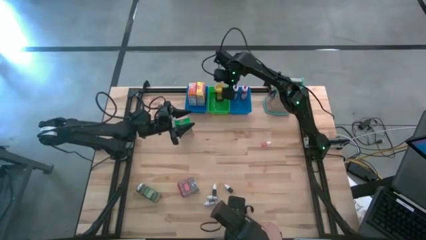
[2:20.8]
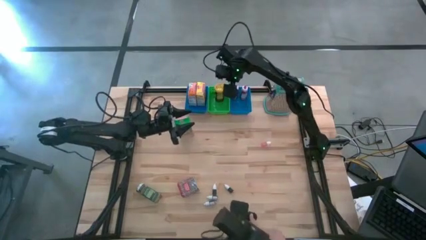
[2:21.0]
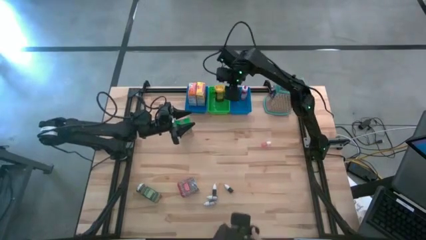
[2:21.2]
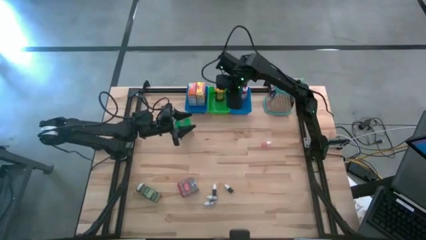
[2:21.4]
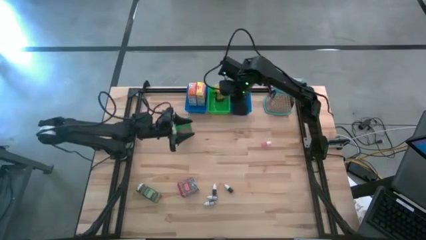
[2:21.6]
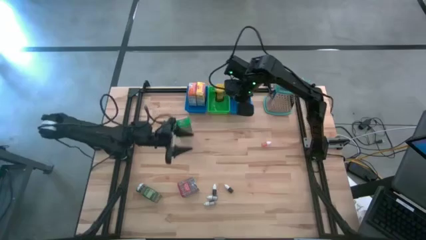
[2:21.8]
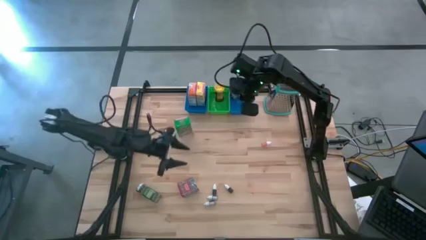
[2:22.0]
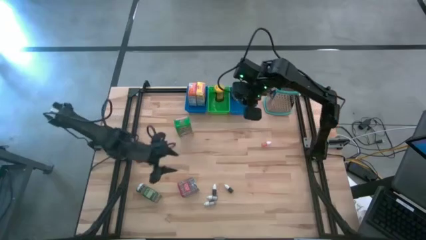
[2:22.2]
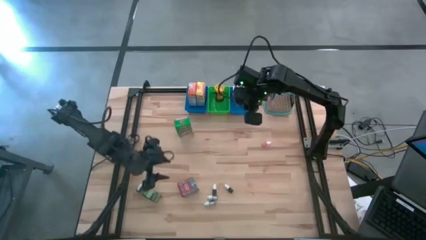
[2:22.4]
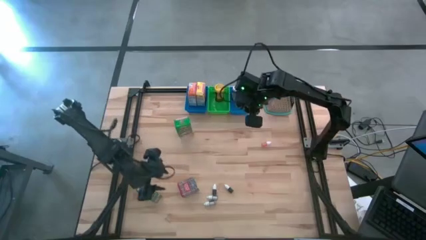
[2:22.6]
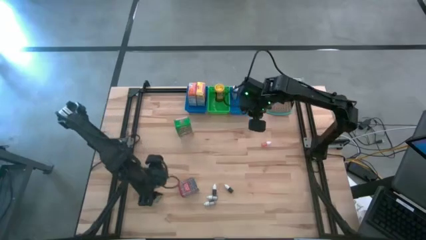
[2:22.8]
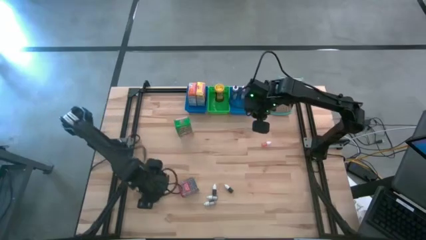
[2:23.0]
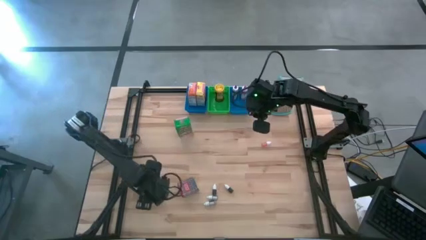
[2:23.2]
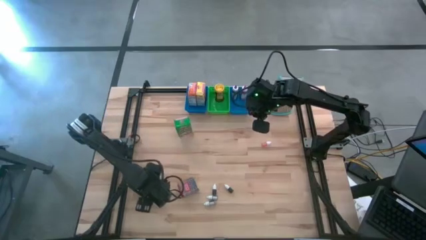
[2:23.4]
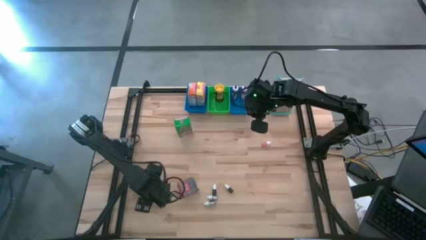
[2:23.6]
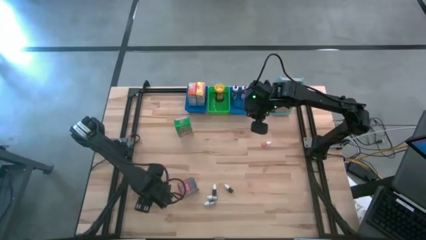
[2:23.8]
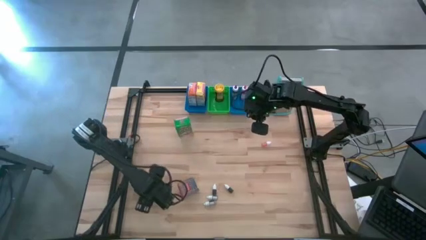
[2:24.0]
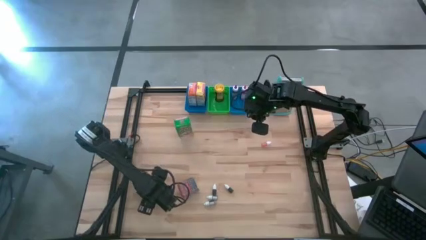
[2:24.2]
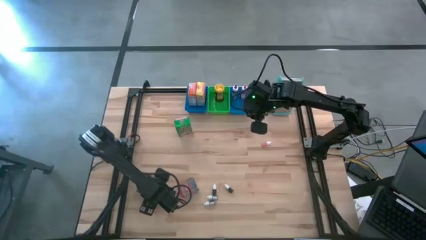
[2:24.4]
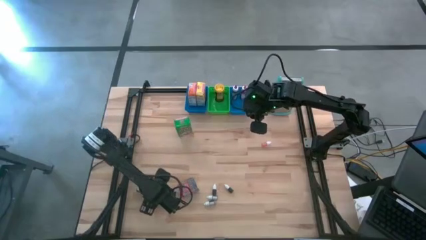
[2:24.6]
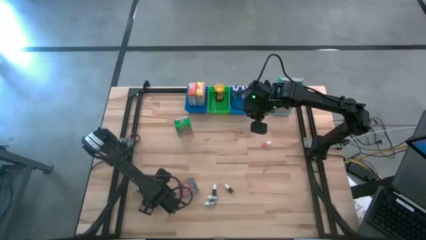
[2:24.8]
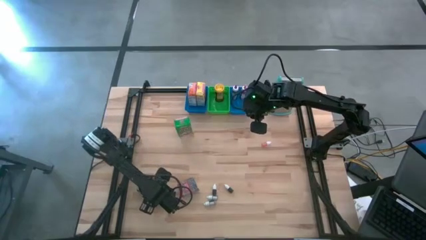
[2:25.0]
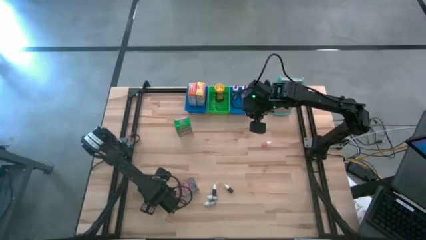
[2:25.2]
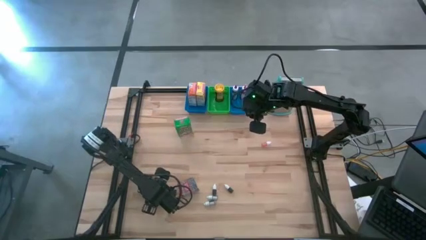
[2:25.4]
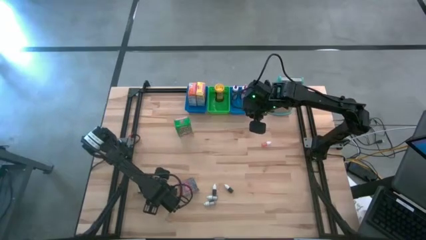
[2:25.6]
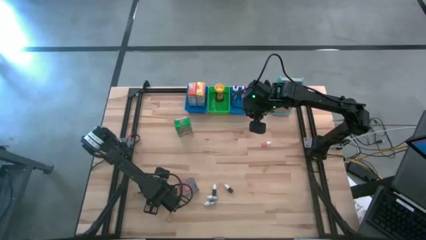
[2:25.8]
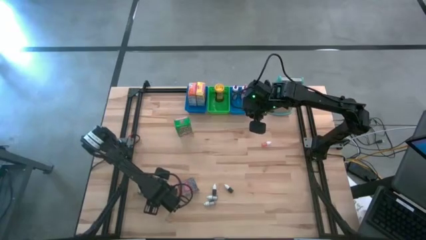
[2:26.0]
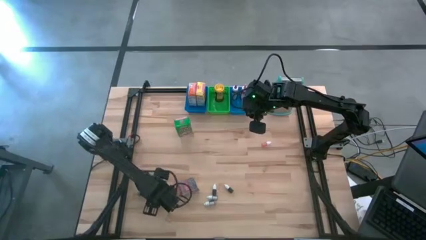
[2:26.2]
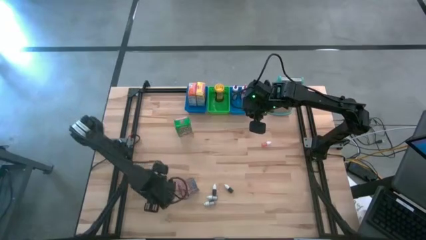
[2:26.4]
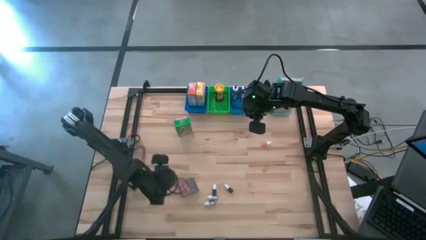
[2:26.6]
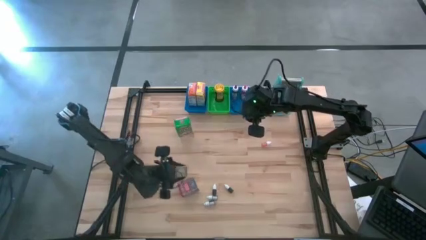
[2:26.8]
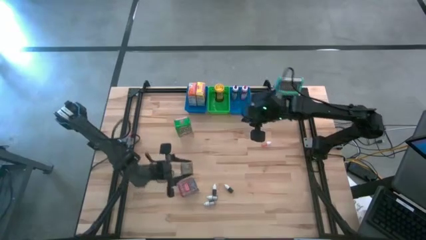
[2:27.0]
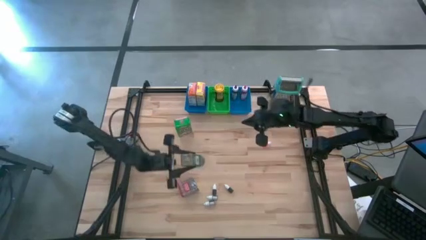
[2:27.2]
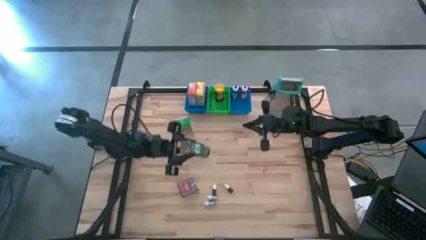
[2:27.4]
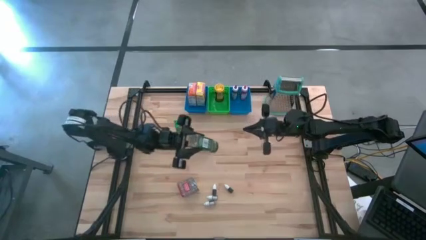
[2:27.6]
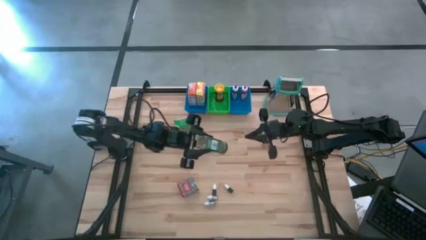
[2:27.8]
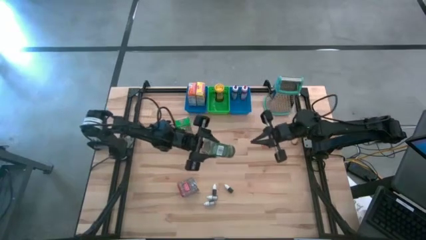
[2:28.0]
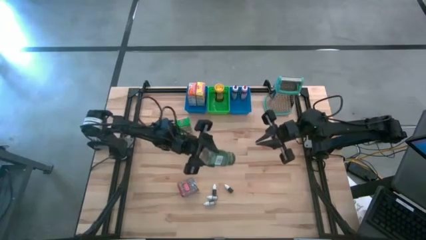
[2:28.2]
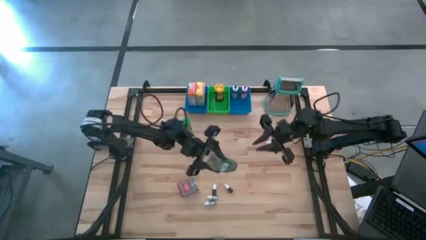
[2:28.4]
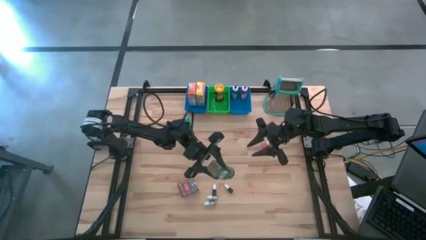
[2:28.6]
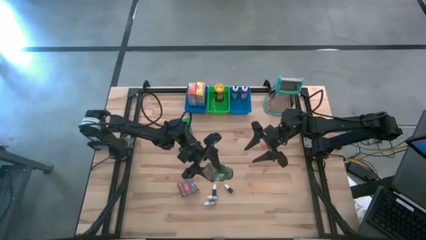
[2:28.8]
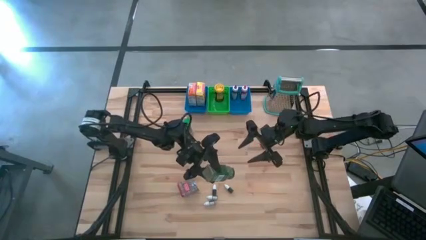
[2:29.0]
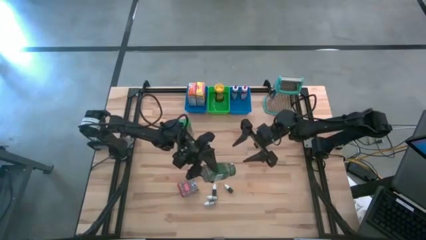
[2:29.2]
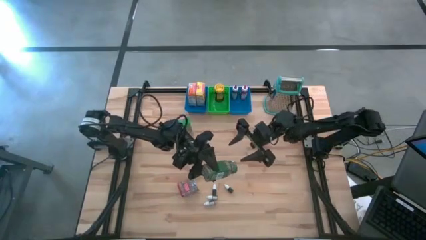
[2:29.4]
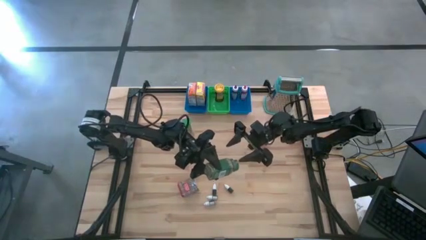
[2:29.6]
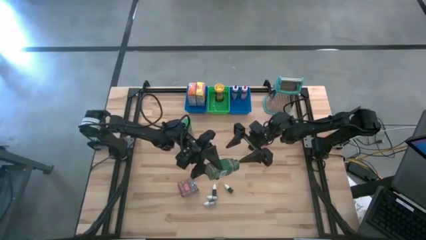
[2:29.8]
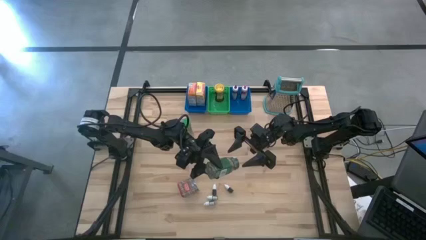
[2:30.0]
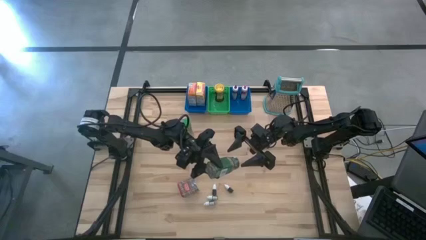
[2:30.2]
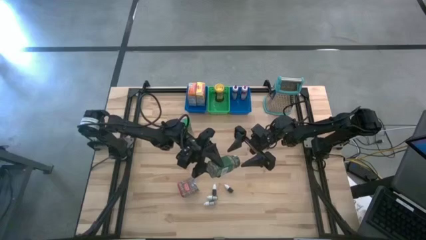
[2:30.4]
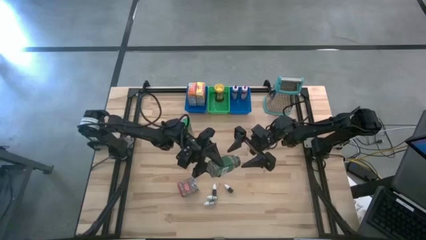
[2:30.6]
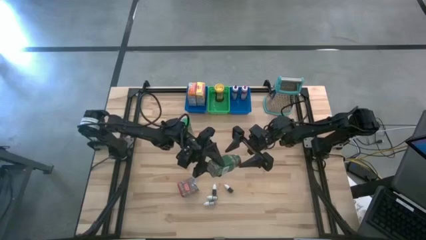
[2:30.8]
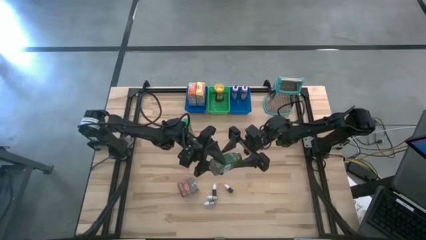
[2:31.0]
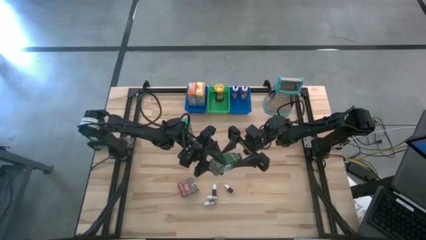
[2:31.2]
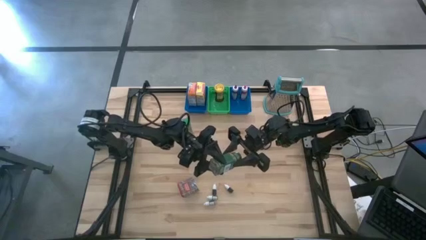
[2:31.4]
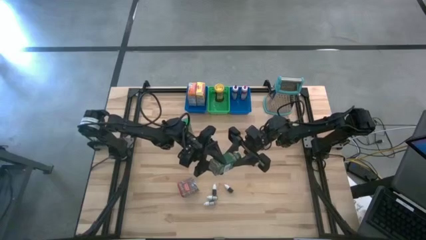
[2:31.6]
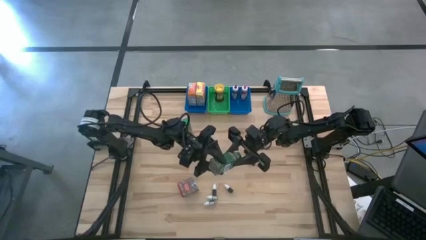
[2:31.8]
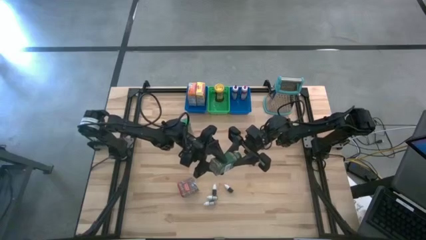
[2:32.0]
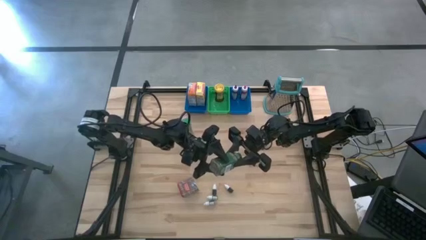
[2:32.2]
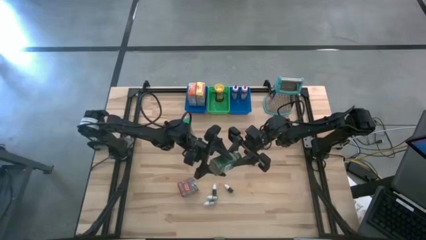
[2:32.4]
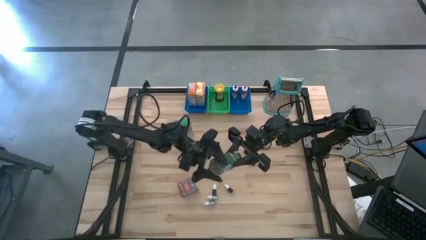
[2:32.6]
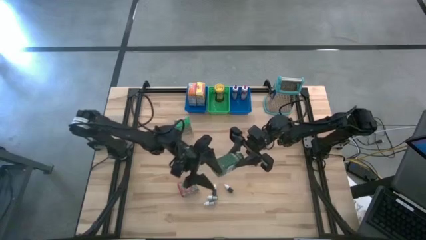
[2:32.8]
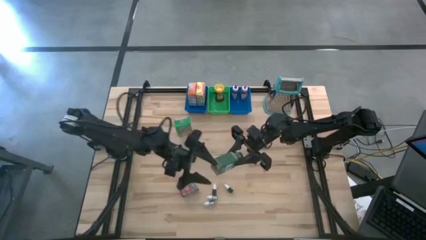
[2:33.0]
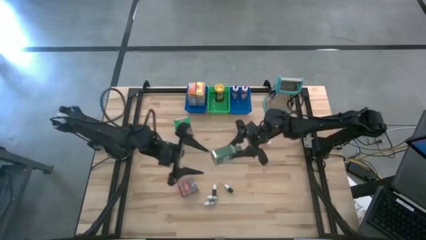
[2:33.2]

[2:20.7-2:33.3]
Task: Pick & Place Kitchen Items
Put the green seasoning bottle into the green bin

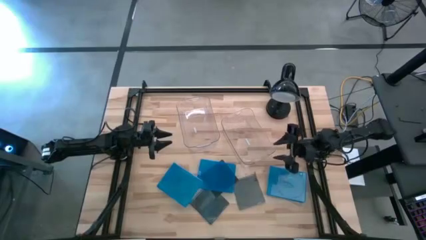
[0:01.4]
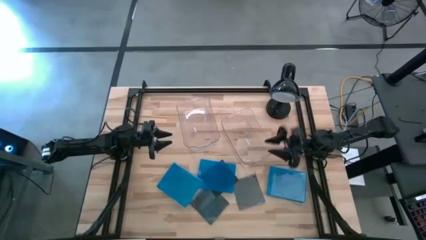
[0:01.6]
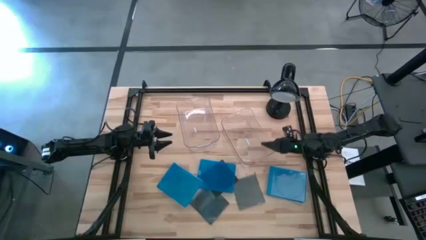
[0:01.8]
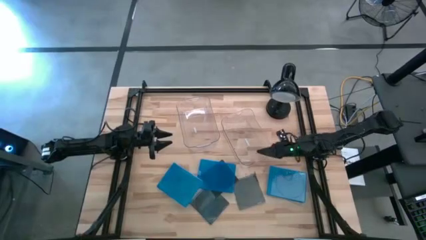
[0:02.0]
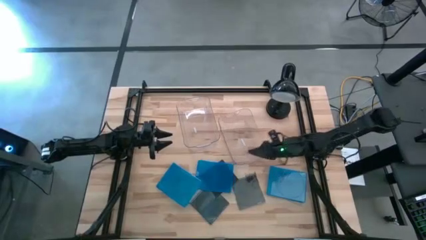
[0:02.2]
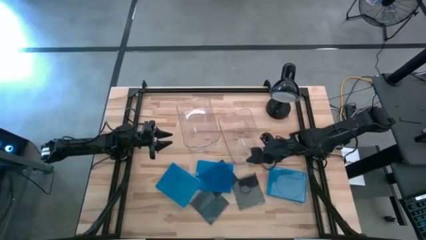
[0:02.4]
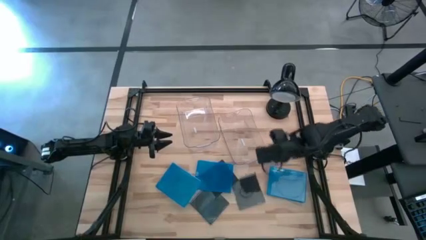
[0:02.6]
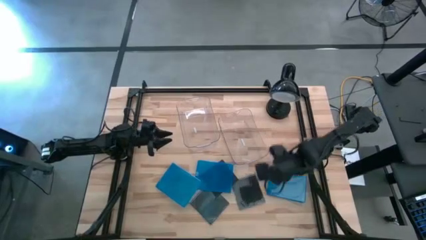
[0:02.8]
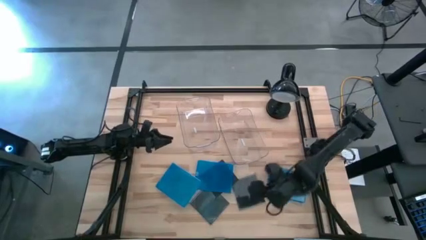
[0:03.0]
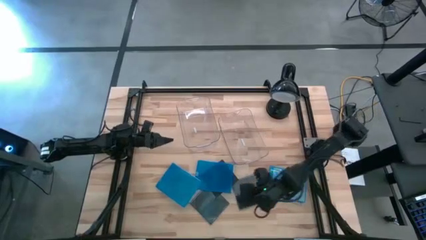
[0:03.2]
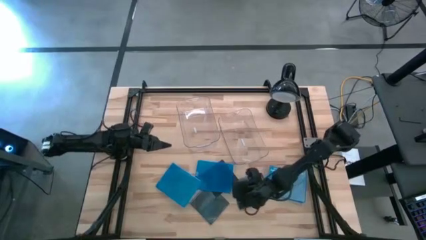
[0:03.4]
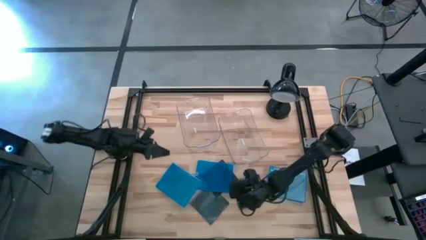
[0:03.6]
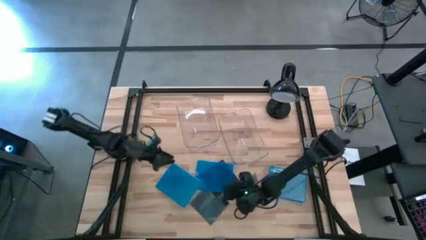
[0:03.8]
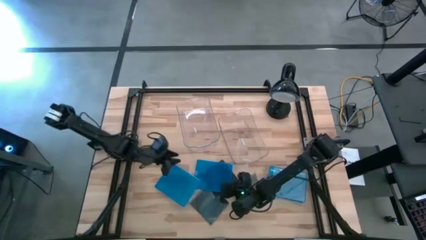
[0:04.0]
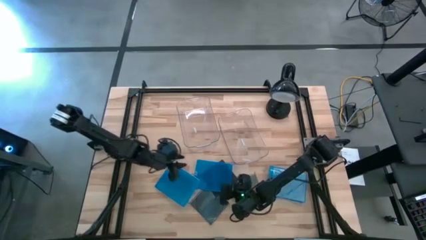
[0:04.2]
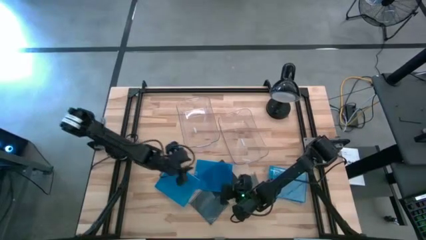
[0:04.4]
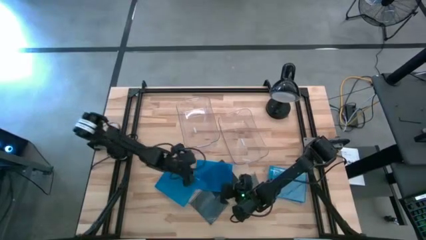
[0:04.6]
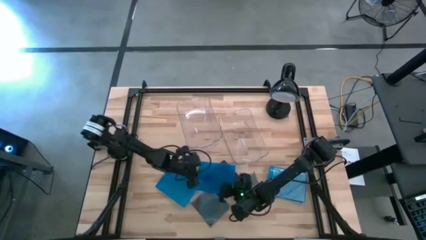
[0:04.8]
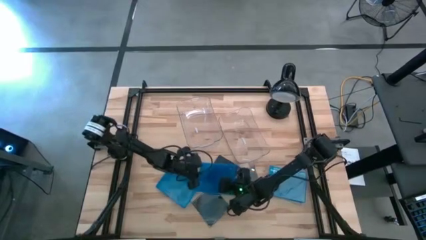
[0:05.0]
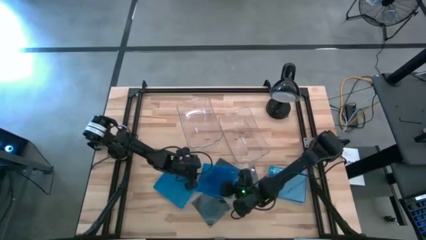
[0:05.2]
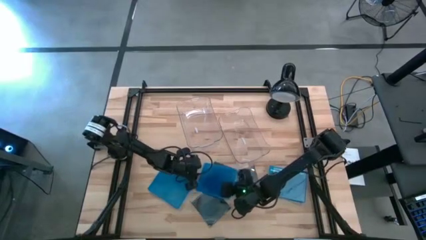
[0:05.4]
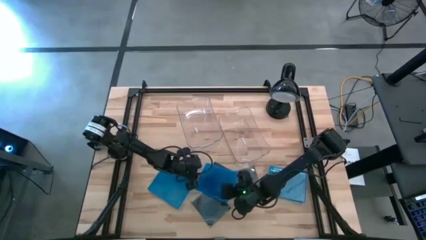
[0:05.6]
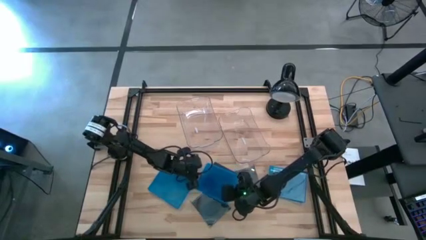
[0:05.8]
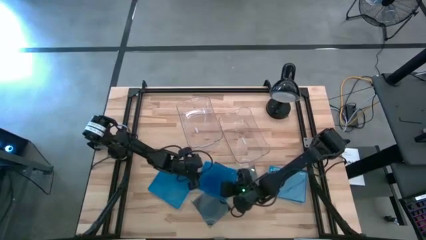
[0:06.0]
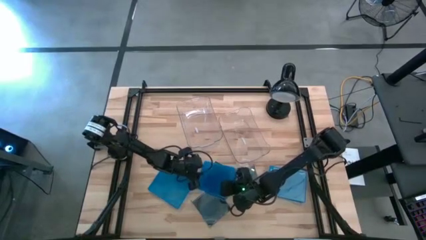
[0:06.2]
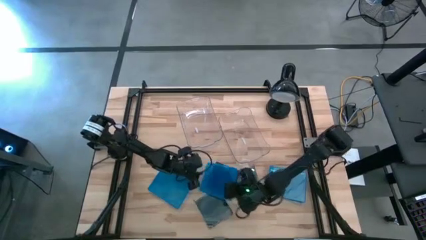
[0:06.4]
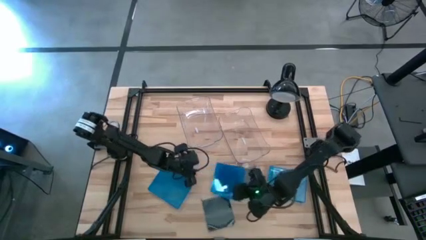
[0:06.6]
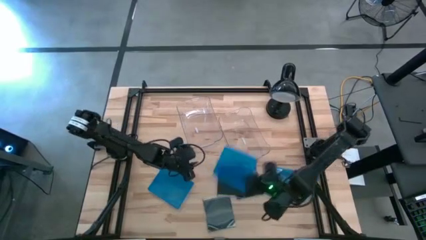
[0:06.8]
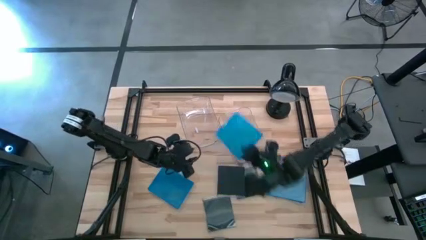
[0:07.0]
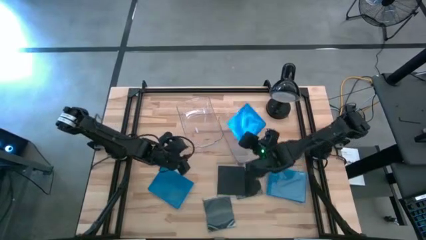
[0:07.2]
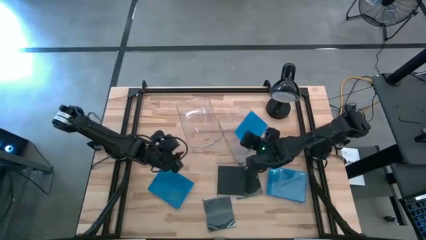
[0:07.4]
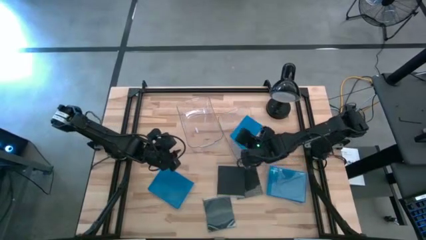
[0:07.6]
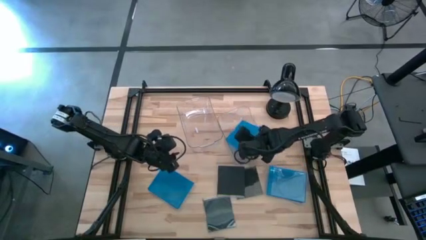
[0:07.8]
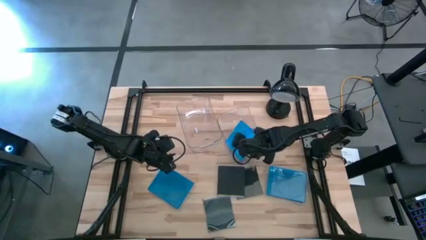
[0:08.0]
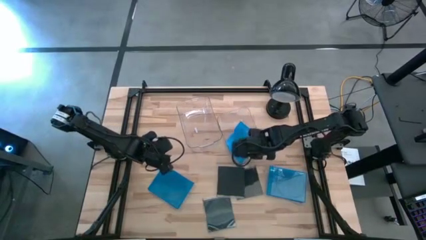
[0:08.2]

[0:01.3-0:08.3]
Task: Pick & place jewel cases by type
Put the blue CD case into the right transparent bin
